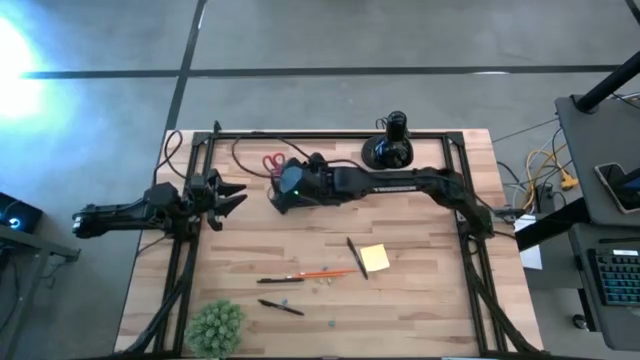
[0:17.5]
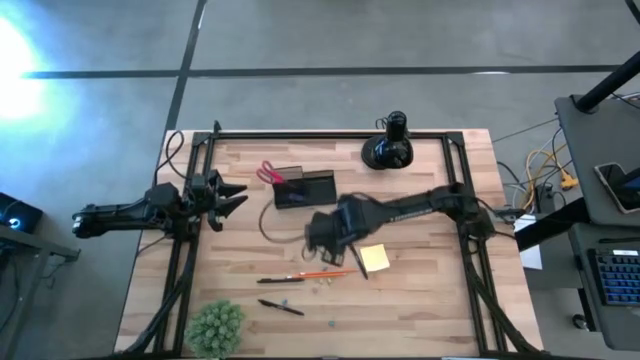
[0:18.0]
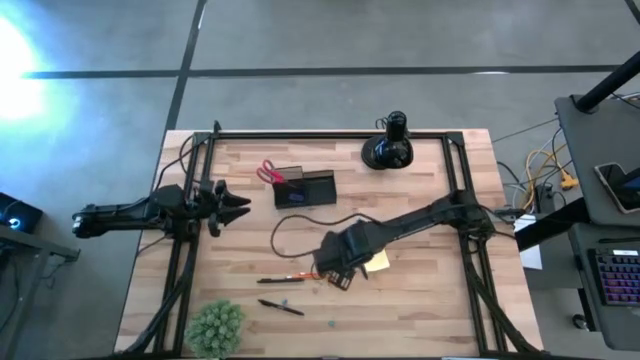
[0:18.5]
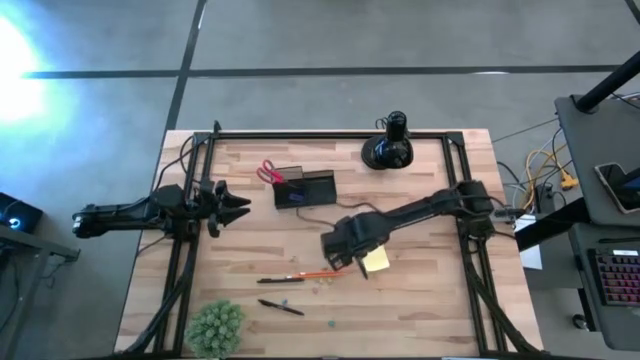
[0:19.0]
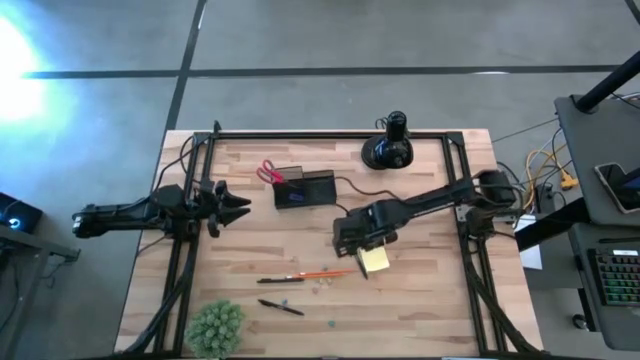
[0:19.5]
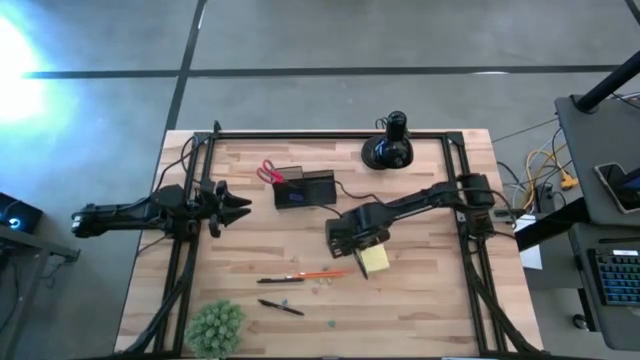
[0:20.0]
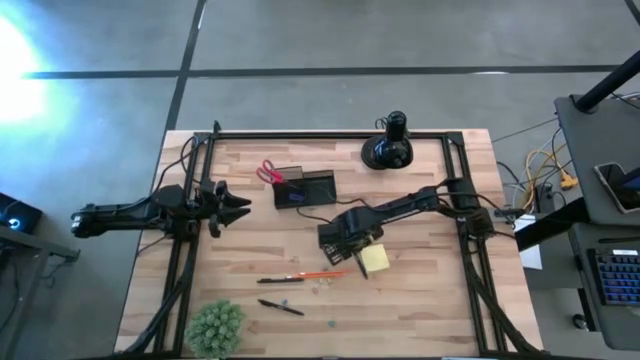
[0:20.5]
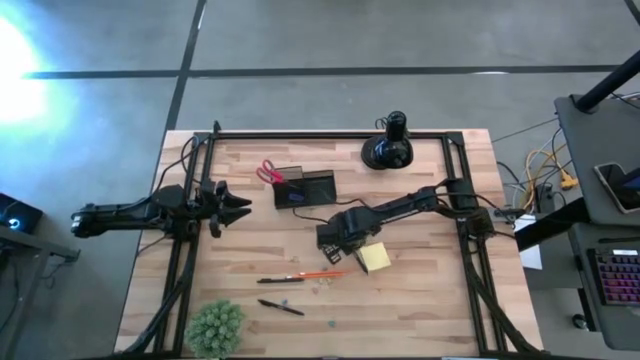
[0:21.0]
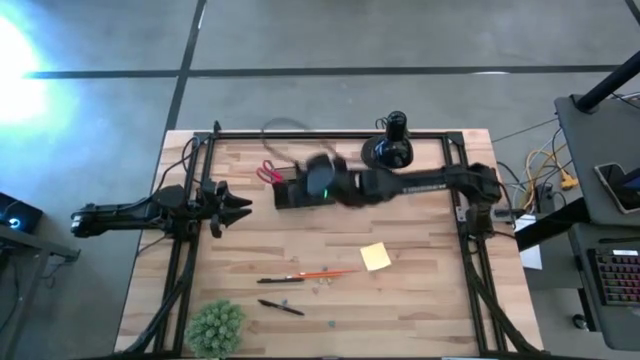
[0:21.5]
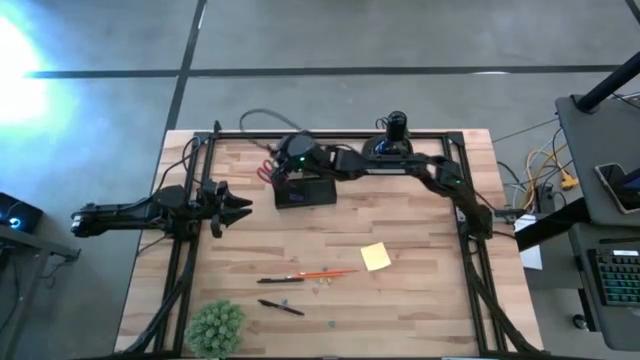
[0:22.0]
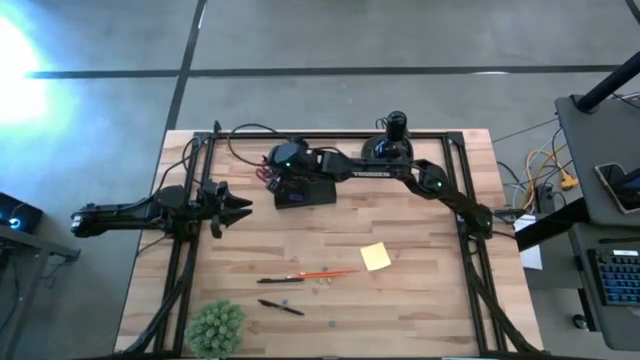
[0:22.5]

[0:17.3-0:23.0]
Task: Pick and place office supplies into organizer
Put the right black pen into the black organizer

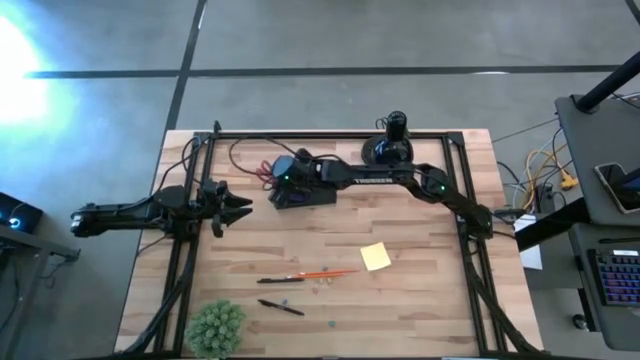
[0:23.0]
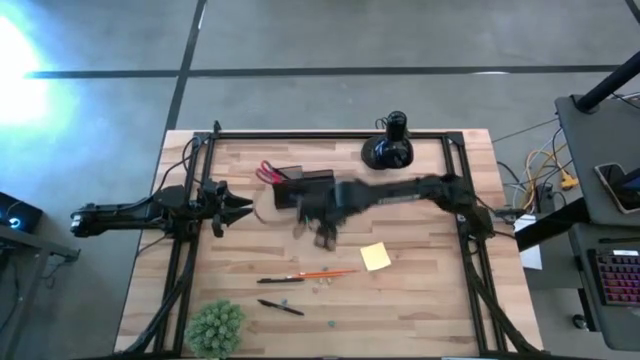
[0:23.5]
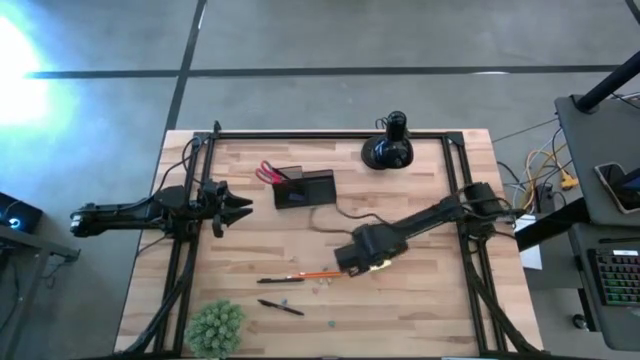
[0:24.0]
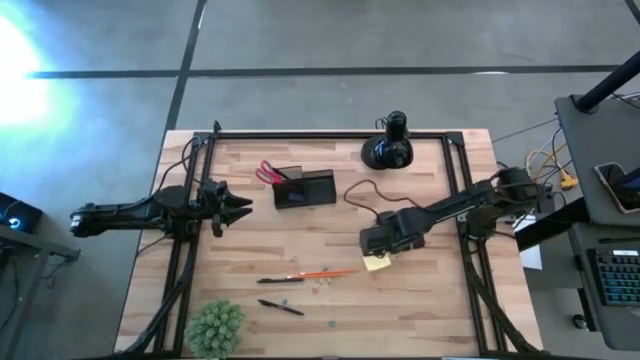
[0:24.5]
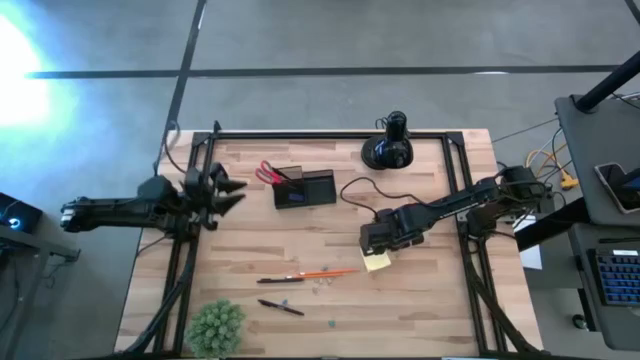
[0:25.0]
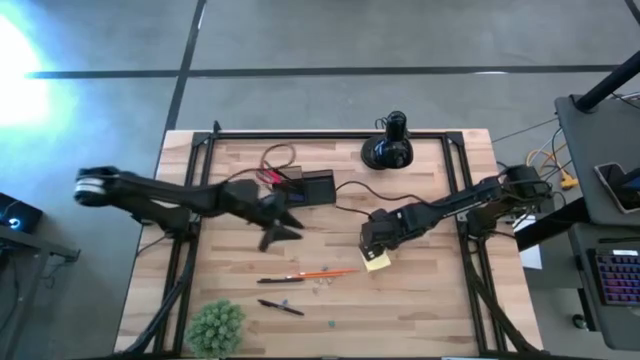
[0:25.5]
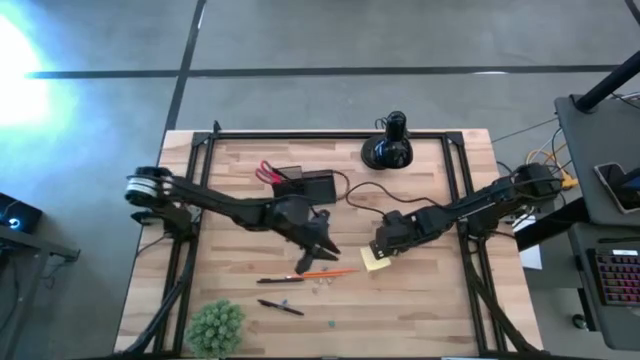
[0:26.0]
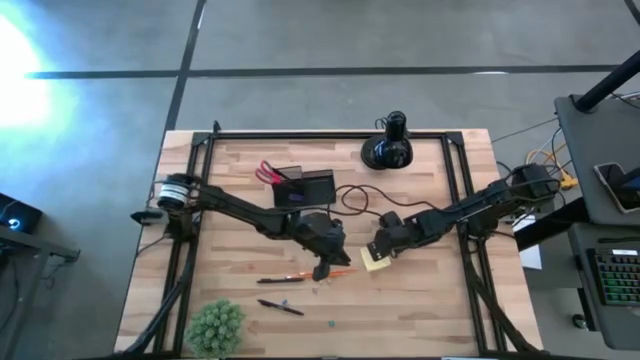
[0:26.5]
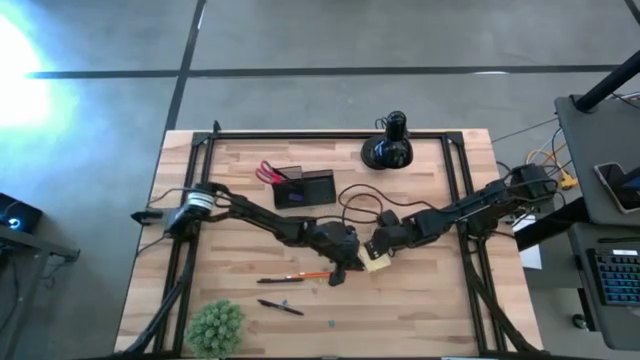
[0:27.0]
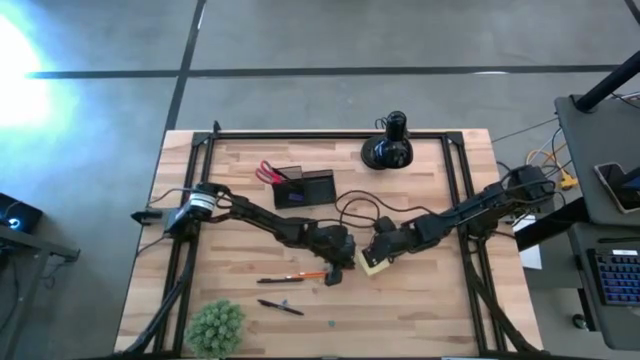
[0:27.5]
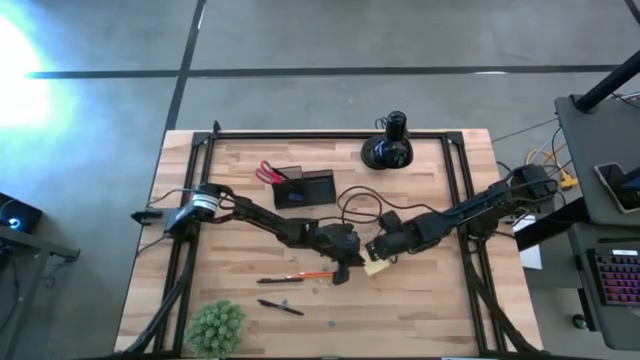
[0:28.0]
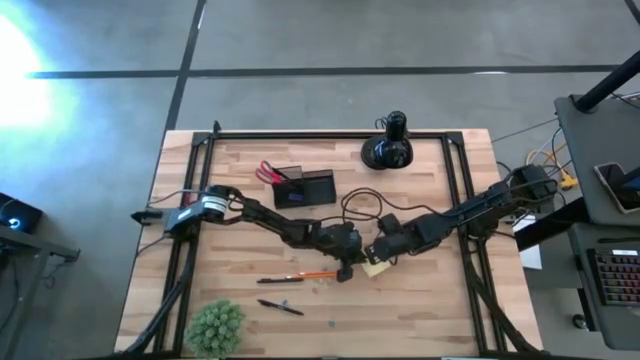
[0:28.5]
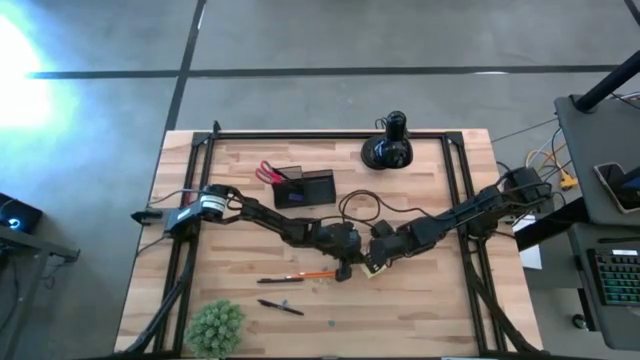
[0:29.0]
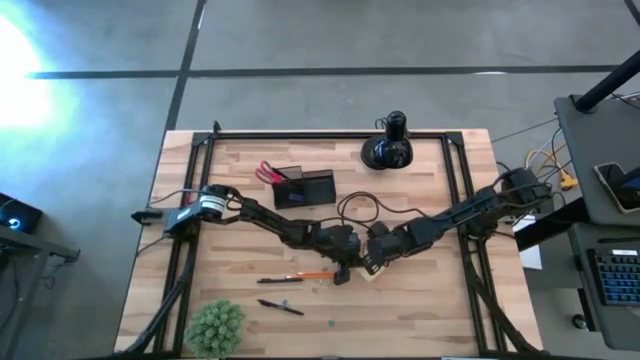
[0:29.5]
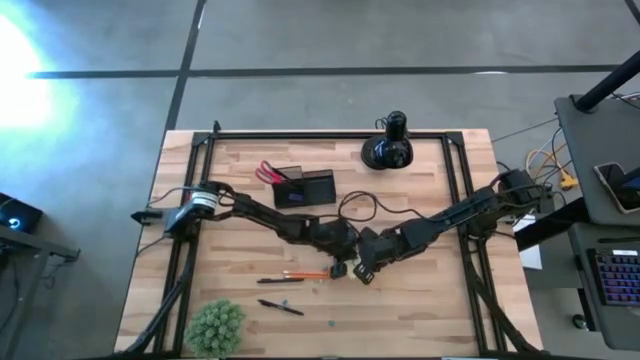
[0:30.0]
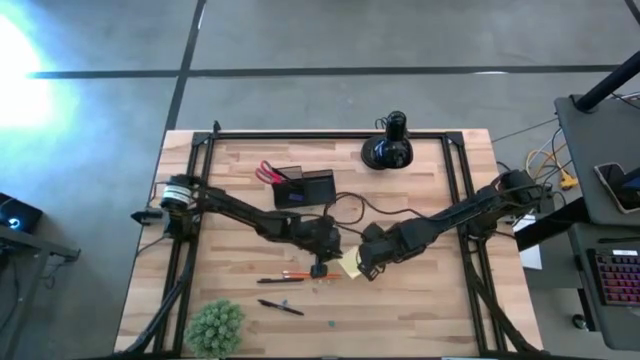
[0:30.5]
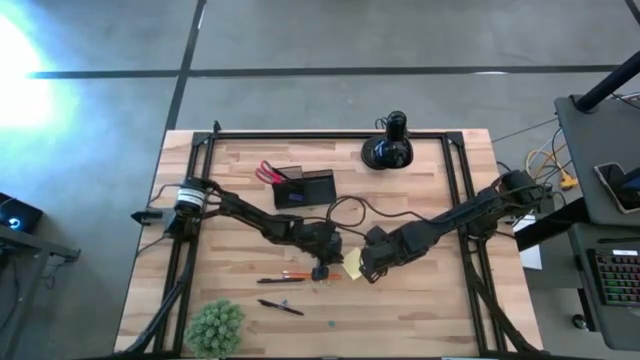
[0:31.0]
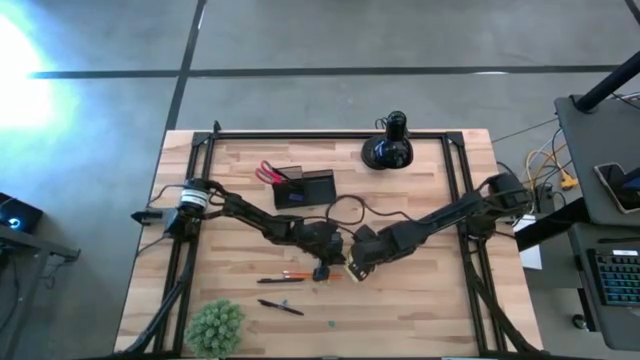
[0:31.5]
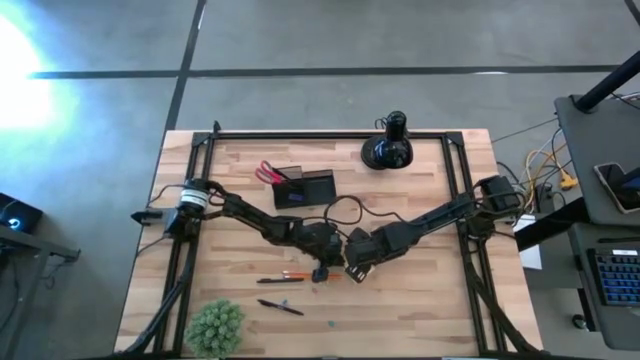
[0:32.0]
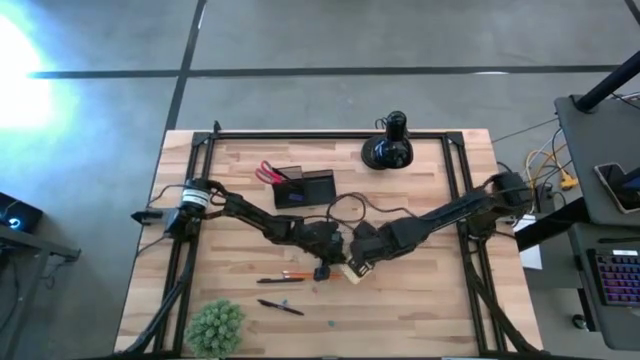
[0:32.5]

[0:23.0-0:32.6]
Put the sticky notes into the black organizer

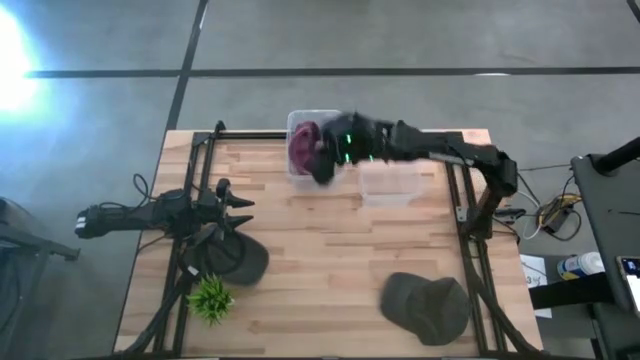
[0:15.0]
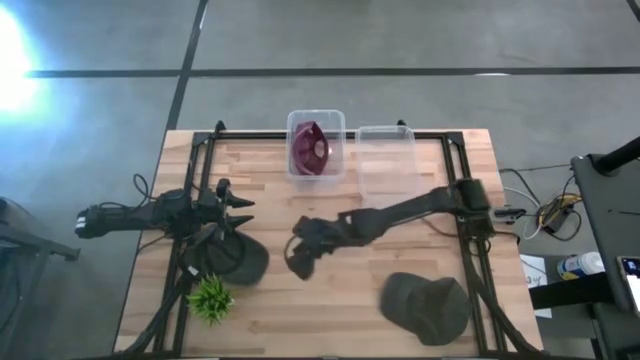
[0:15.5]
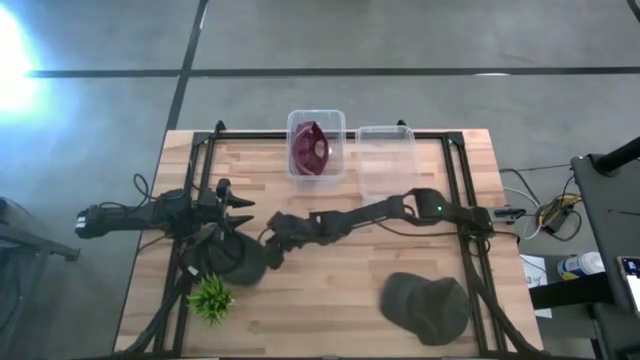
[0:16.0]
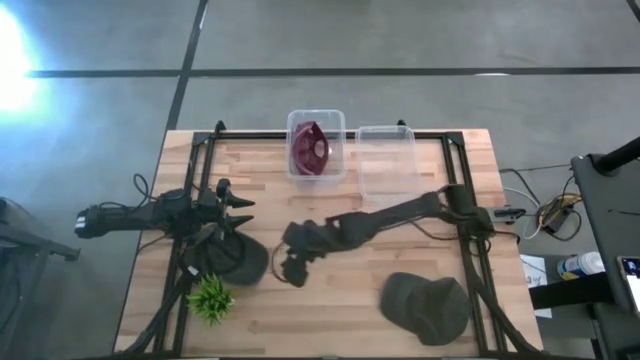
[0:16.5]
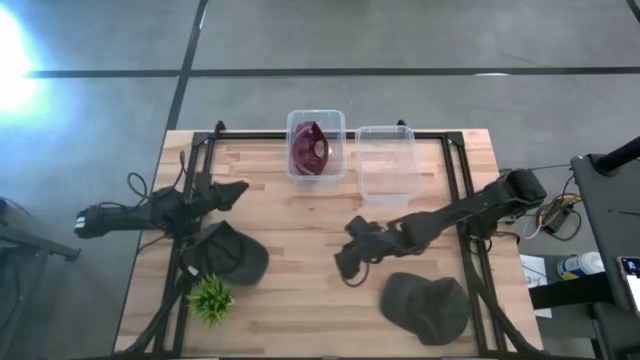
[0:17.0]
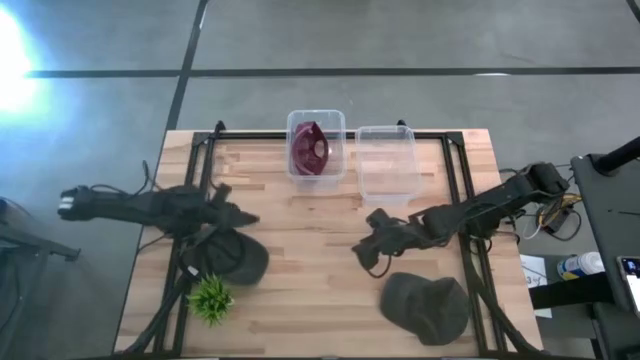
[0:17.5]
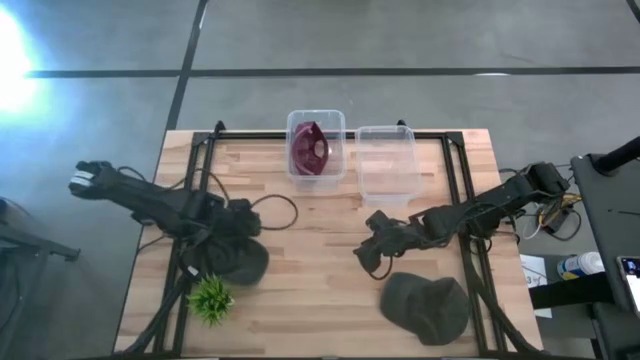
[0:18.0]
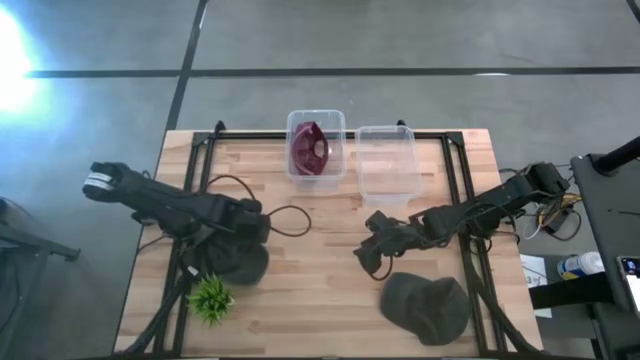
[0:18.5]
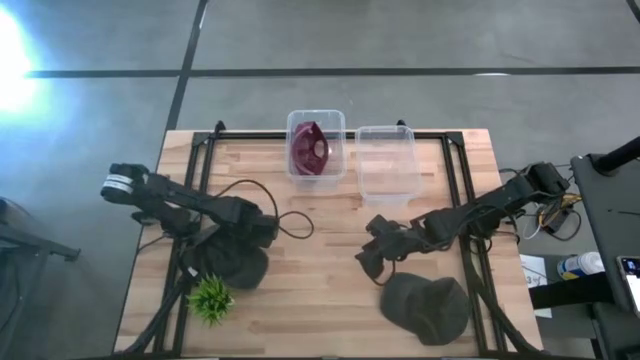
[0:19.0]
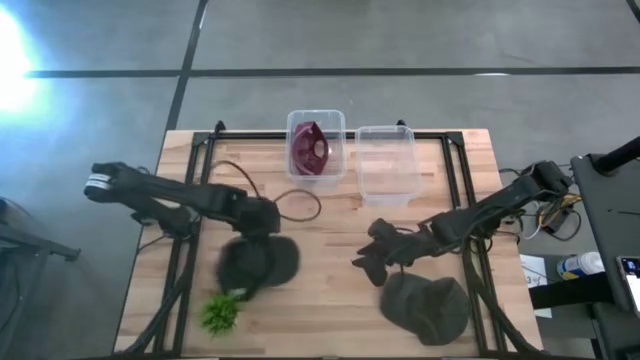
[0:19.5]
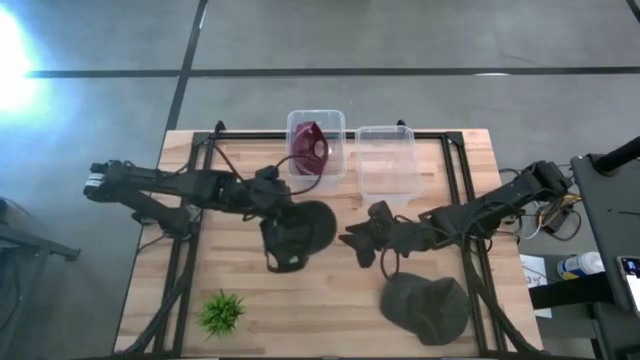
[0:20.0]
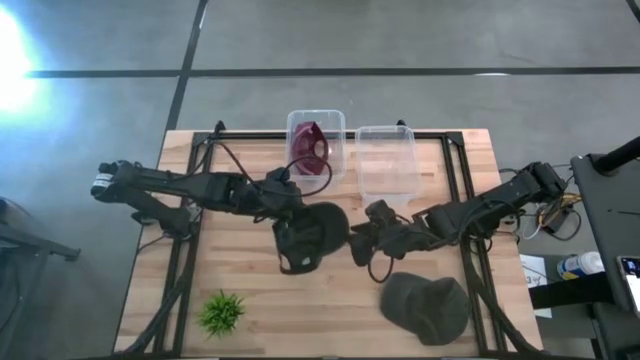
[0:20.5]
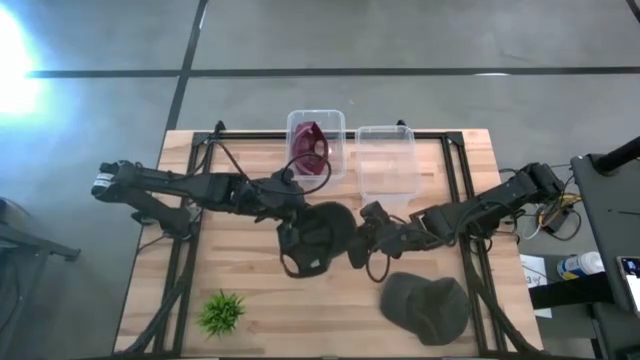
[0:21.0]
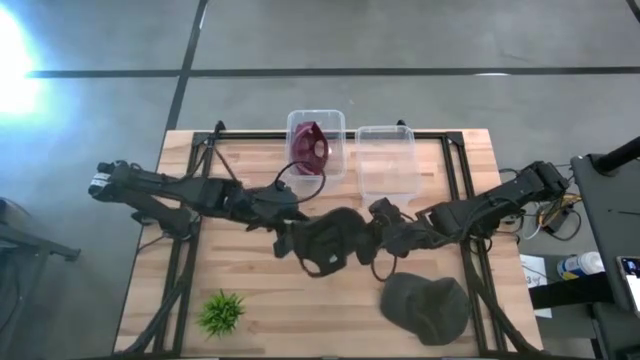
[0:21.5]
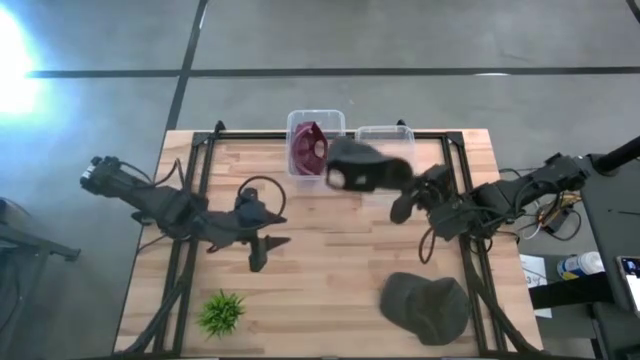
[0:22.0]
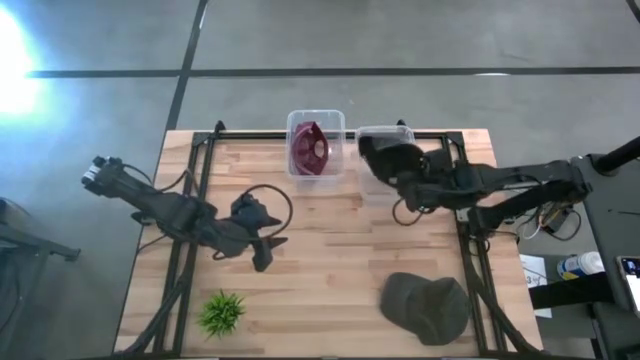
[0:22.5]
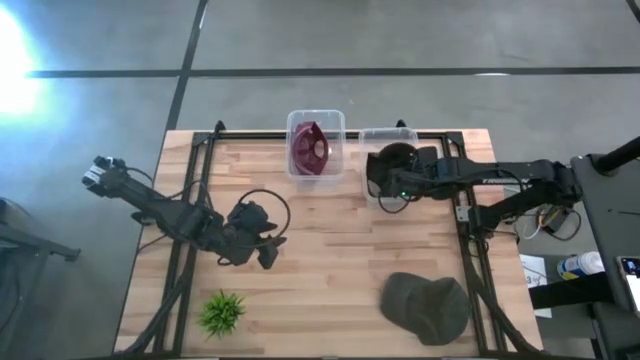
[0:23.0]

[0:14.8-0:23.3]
Task: Pick & Place hat
Put the top black cap into the right transparent bin
